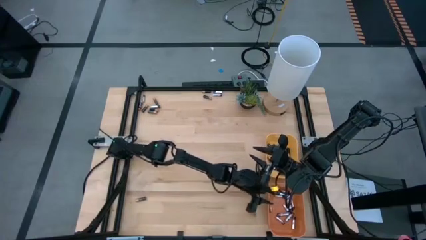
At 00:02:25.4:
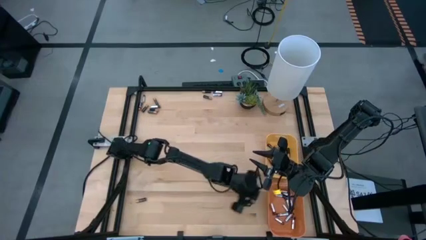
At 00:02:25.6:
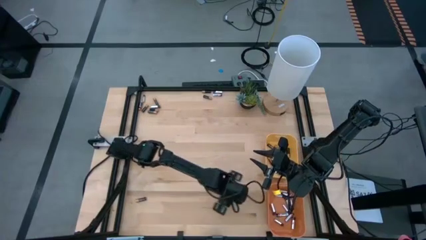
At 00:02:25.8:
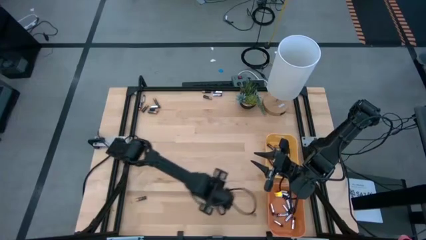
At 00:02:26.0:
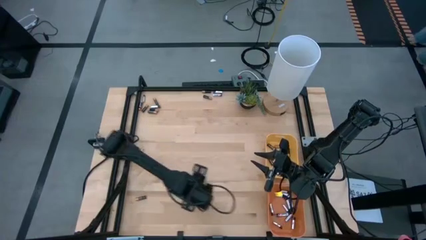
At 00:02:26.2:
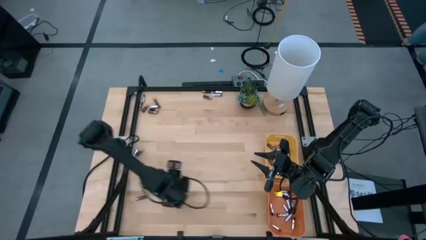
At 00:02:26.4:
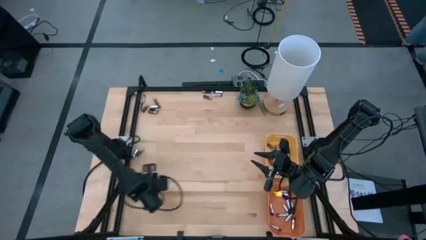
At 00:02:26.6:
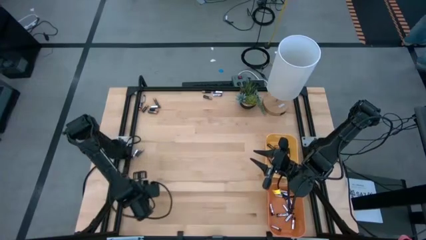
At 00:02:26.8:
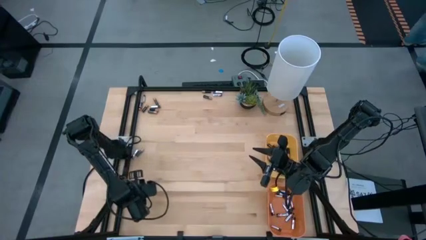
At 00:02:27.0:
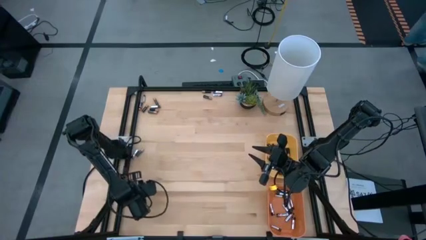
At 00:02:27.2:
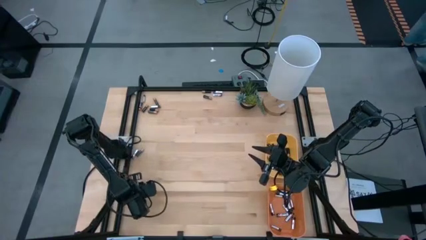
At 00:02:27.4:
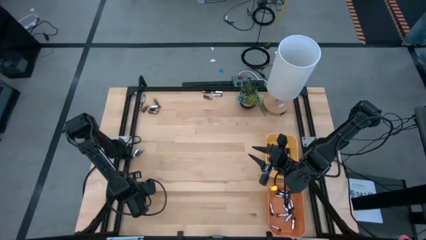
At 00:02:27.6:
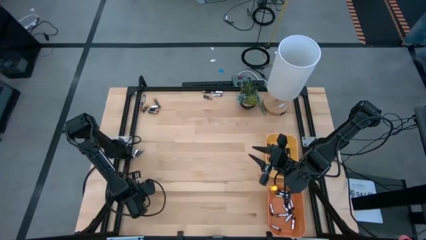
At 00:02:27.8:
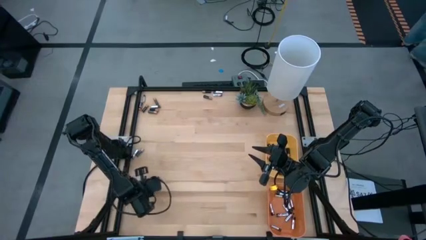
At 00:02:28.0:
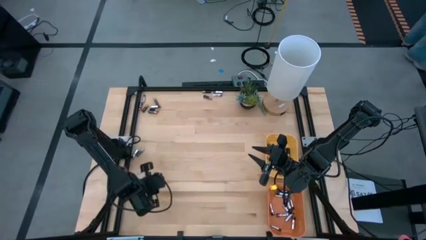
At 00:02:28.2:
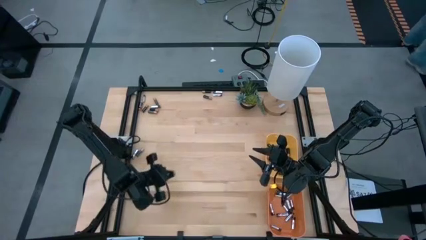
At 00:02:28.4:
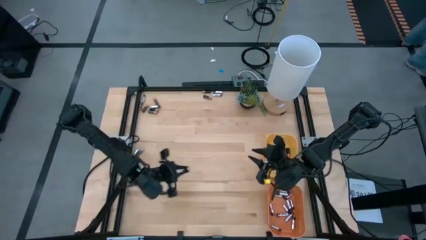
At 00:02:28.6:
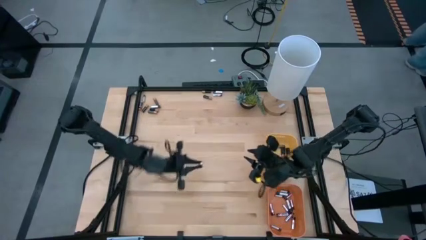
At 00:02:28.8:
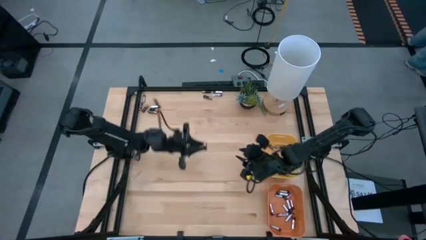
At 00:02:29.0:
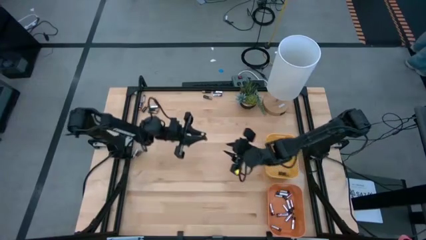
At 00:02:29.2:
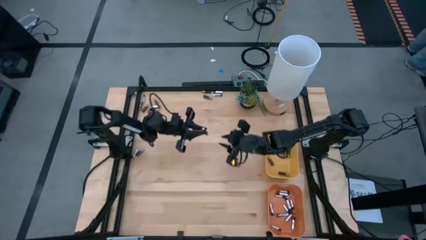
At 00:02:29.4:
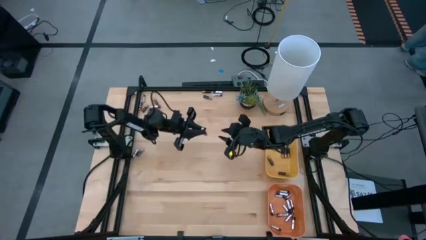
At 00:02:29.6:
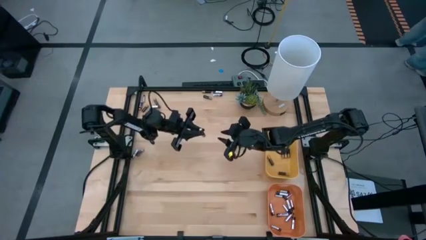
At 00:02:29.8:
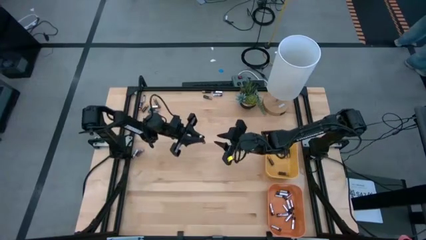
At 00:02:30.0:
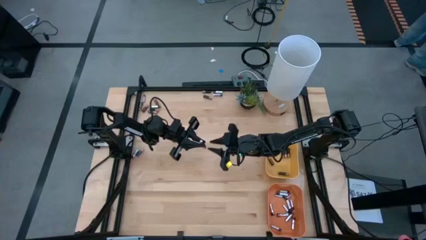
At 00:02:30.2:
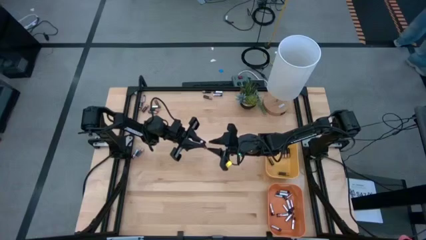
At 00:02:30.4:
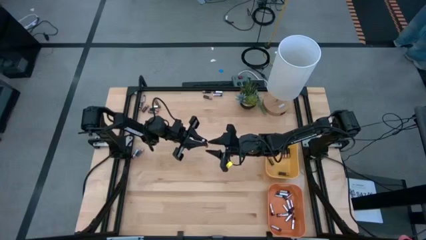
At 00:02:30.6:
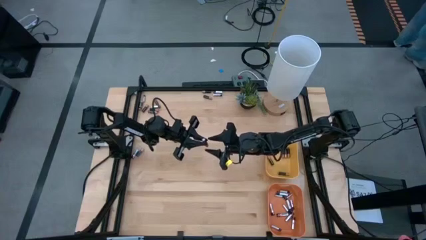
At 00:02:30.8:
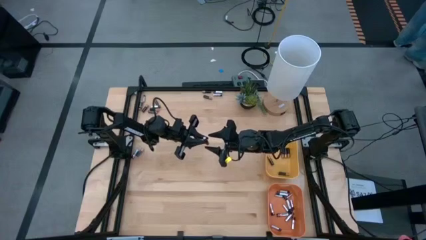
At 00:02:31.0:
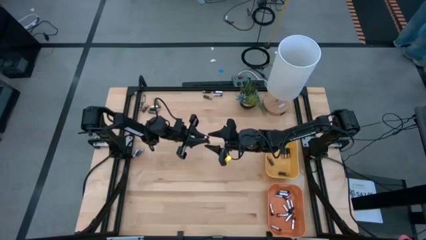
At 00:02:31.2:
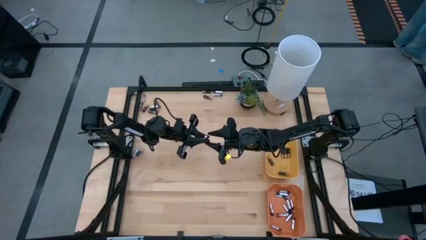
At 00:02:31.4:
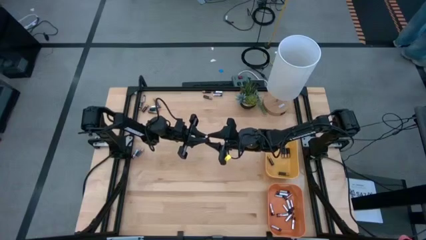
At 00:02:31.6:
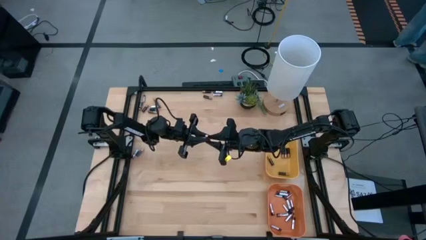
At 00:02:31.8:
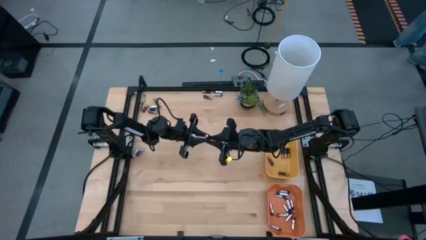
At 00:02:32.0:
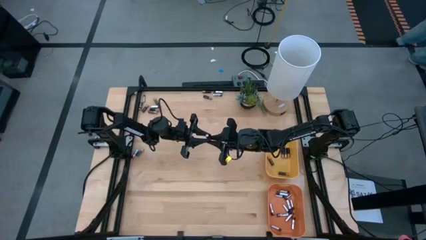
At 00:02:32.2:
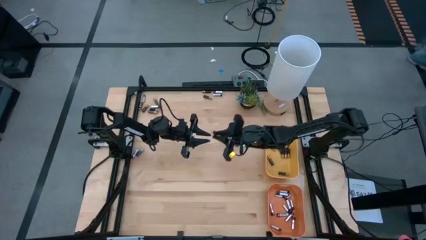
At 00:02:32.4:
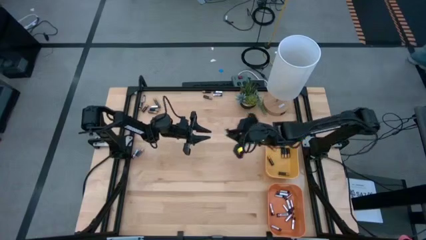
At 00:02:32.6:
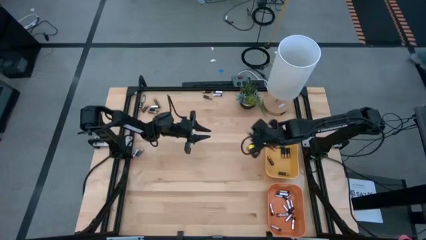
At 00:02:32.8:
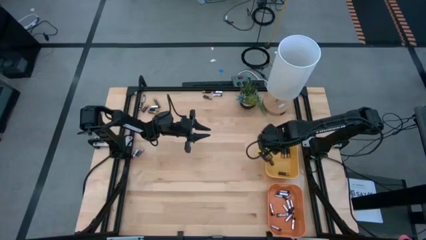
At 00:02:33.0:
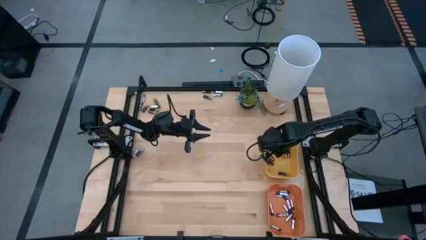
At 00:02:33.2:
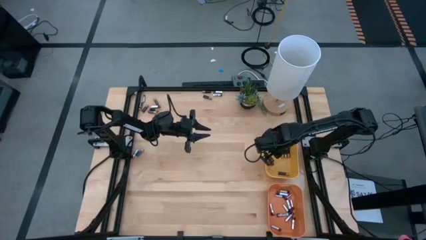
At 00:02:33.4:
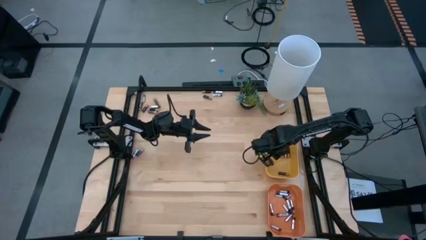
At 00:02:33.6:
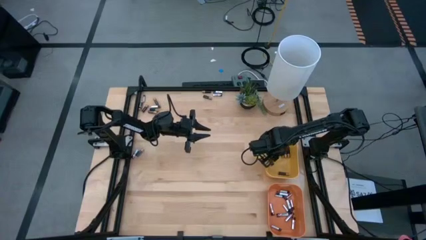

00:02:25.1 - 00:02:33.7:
Task: Sort batteries
Put the brown battery into the yellow bin

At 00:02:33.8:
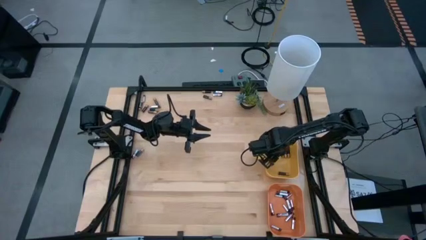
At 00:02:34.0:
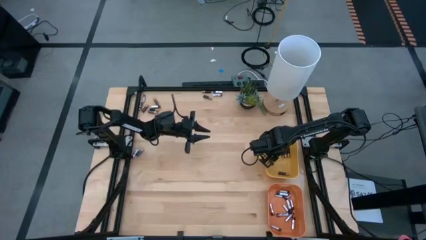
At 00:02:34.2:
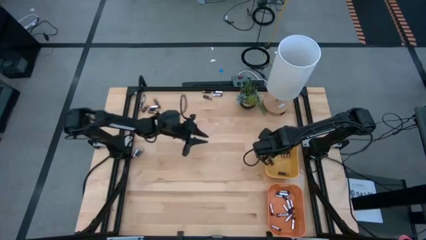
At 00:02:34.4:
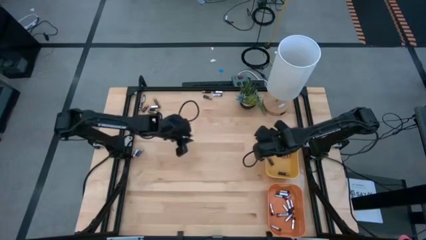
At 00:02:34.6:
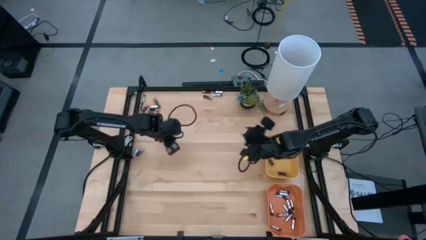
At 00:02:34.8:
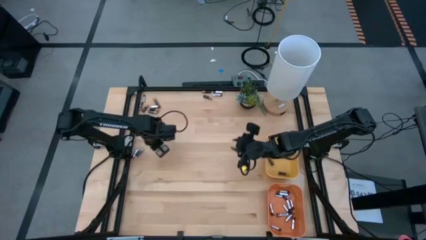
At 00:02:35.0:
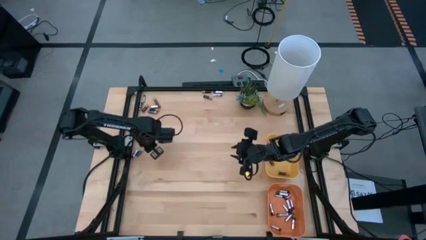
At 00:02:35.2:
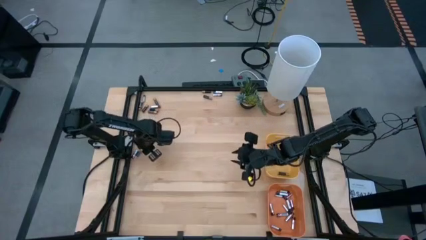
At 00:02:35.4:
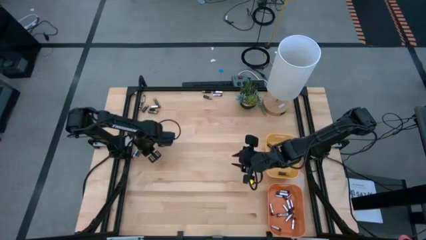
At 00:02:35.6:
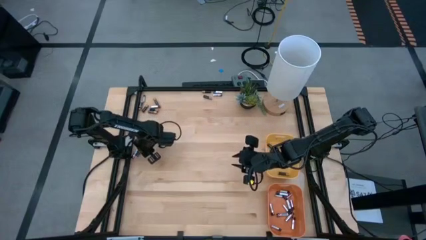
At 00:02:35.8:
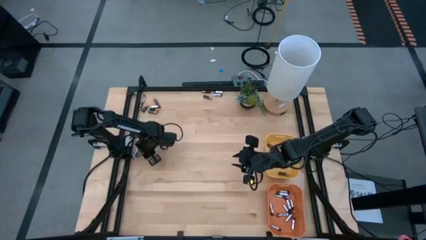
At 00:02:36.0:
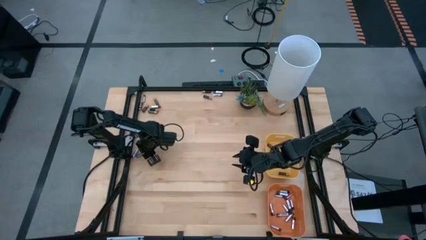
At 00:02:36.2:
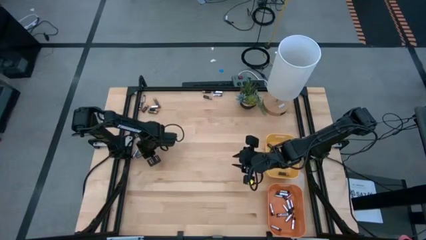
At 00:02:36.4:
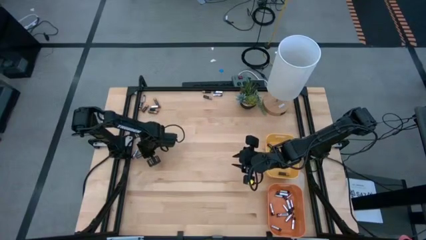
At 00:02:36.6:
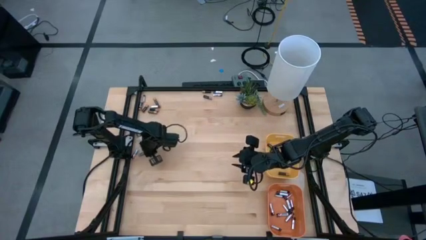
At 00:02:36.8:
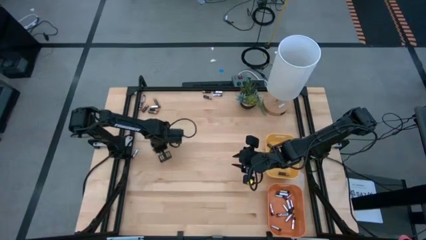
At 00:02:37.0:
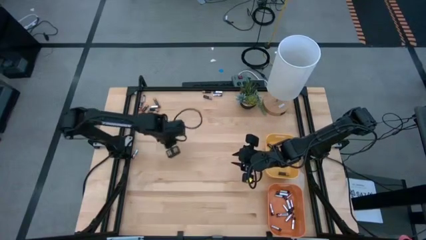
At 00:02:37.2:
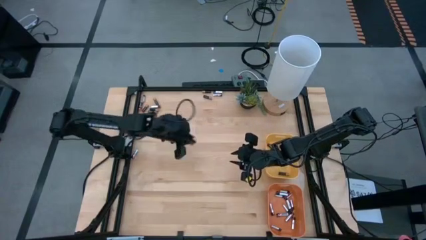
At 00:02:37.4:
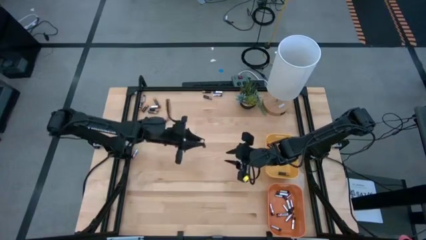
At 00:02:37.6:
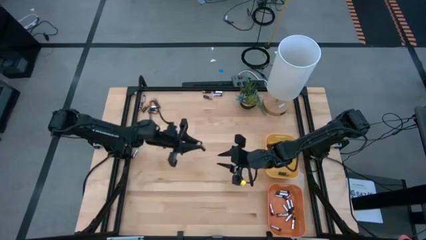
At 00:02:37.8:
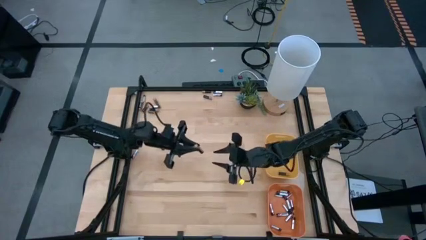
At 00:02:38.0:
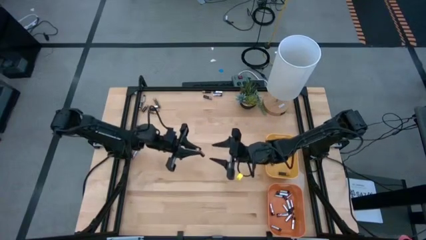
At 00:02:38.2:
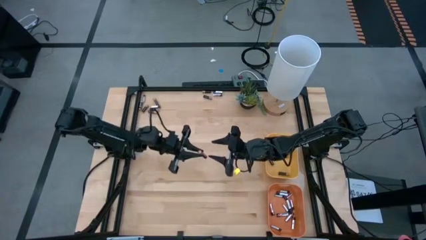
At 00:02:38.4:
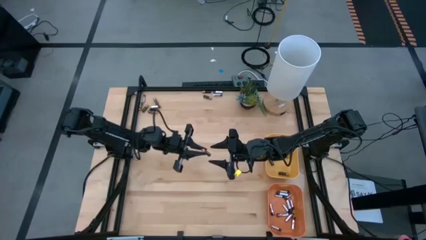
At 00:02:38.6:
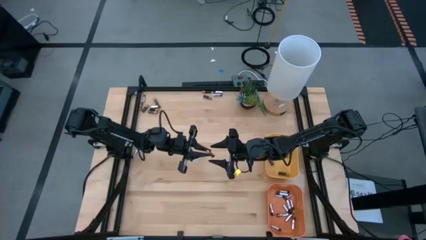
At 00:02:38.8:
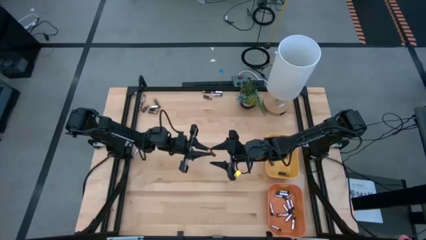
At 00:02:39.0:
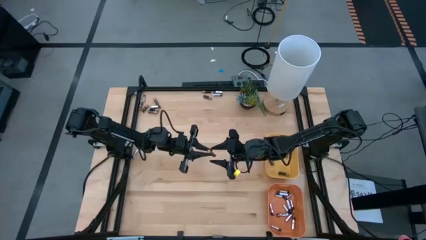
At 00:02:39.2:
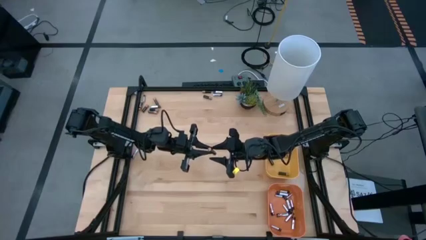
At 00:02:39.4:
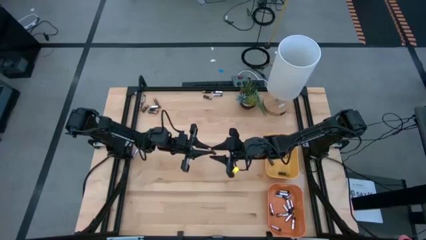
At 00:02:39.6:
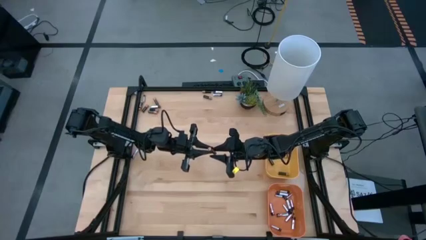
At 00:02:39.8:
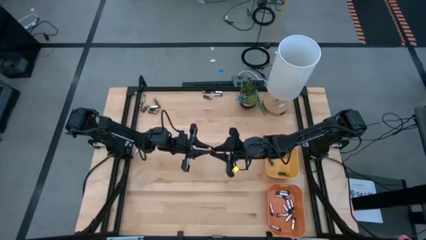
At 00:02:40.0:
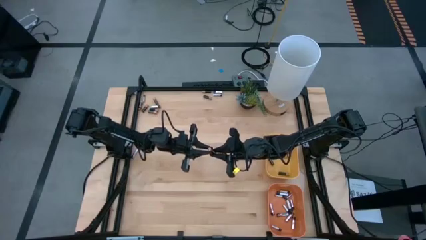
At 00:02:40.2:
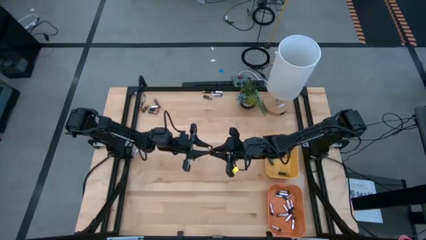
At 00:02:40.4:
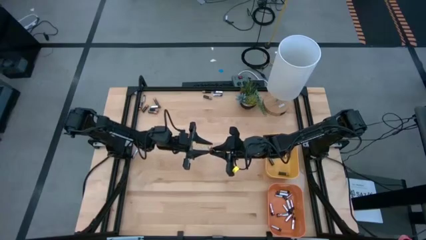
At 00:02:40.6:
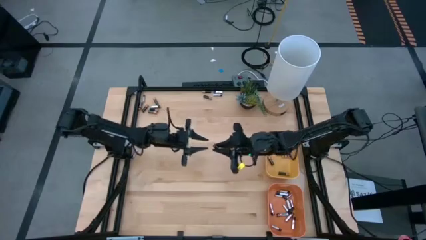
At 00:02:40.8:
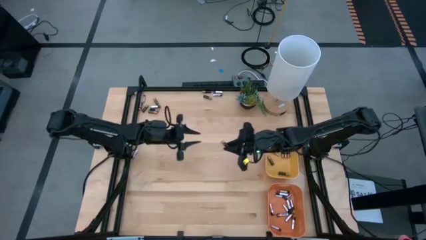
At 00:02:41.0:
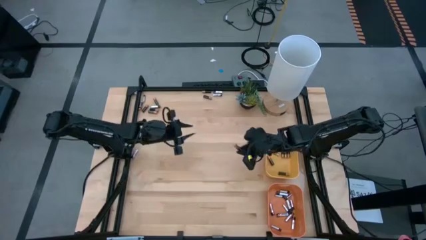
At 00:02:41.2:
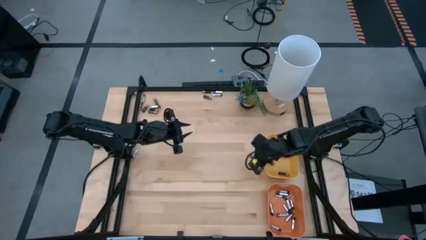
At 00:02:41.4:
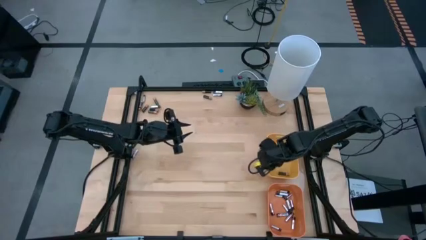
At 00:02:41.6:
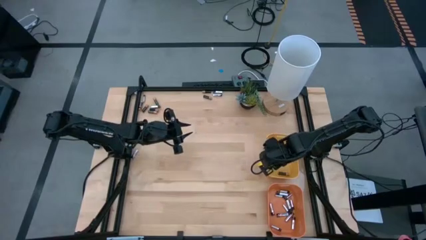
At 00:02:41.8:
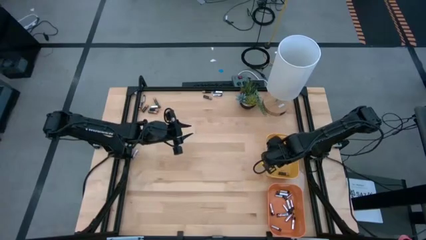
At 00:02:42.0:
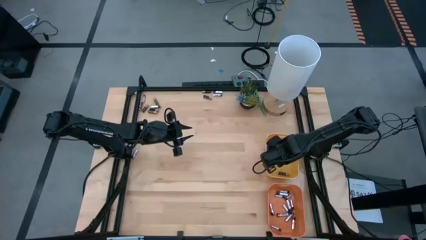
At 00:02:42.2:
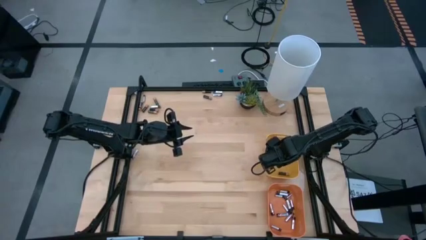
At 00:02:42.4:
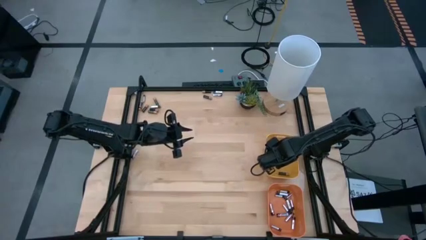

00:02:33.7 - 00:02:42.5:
Put the brown battery into the yellow bin
